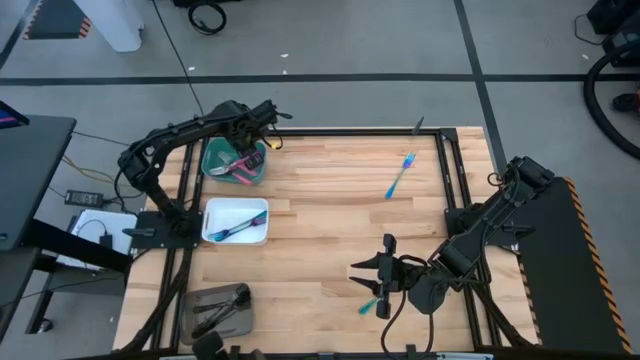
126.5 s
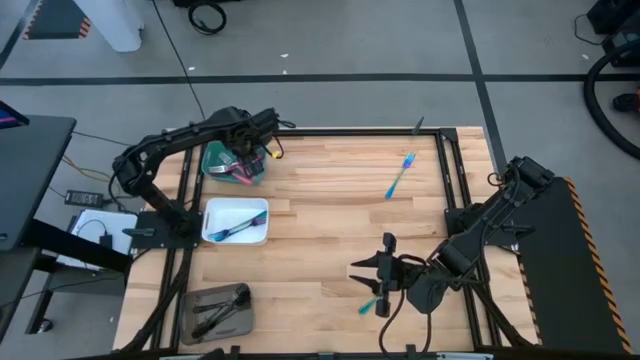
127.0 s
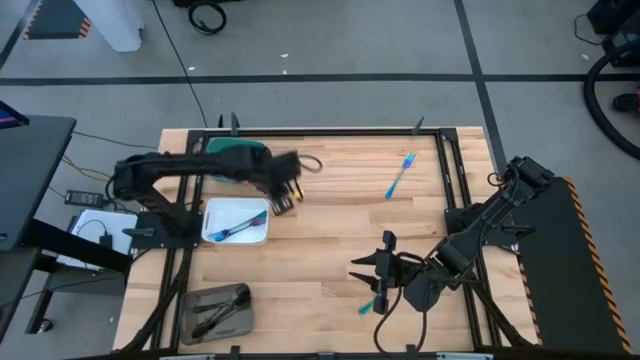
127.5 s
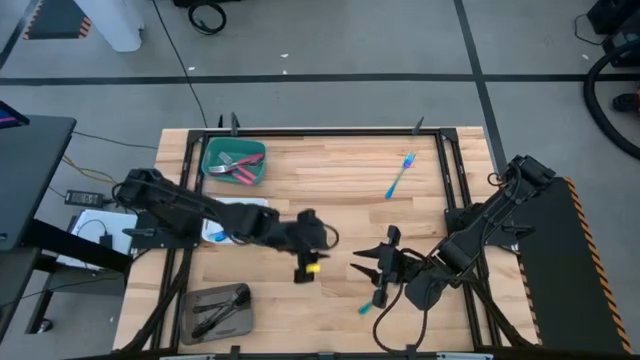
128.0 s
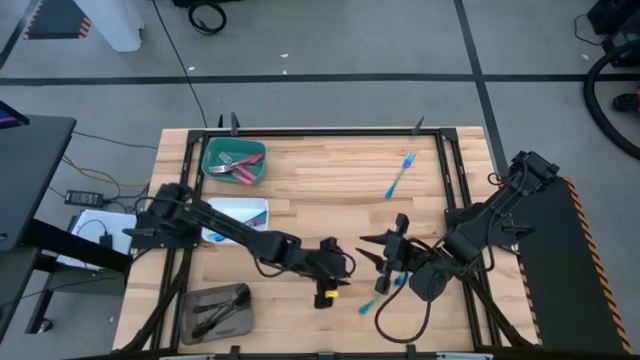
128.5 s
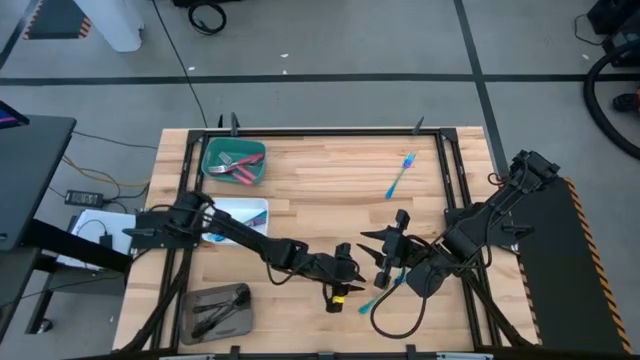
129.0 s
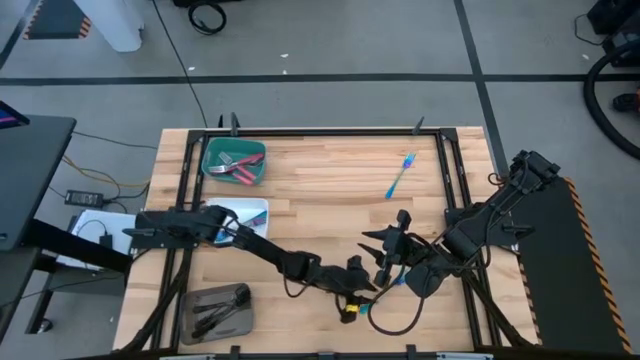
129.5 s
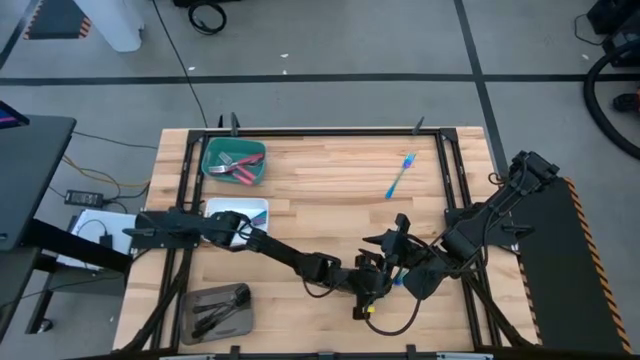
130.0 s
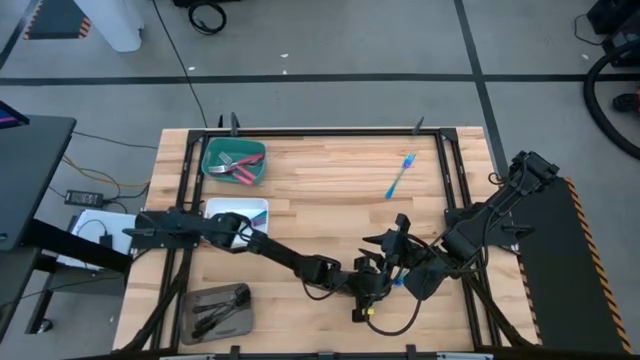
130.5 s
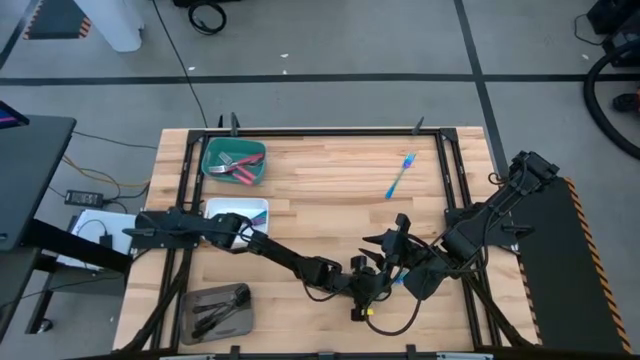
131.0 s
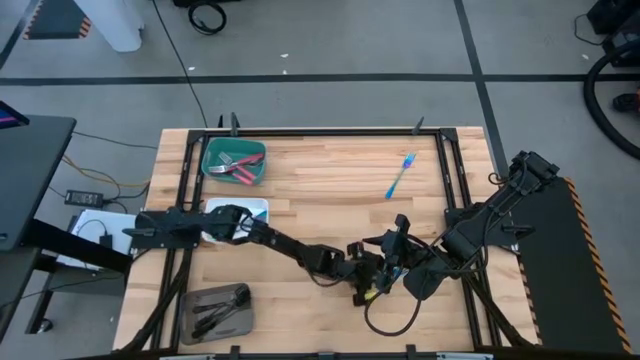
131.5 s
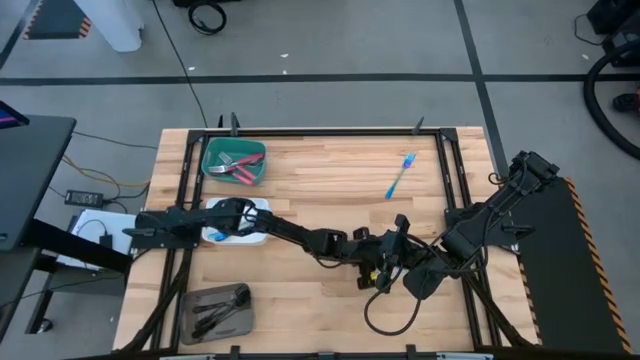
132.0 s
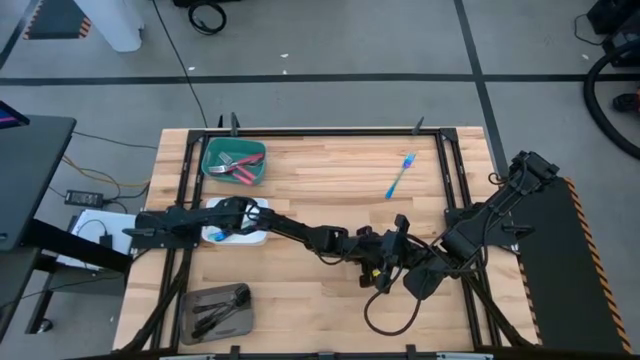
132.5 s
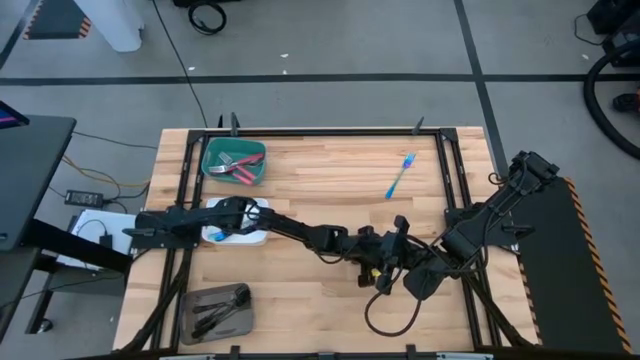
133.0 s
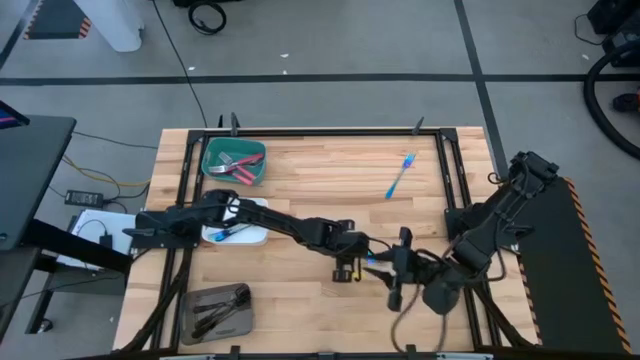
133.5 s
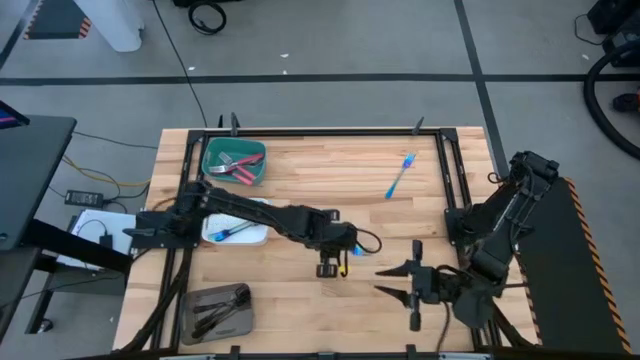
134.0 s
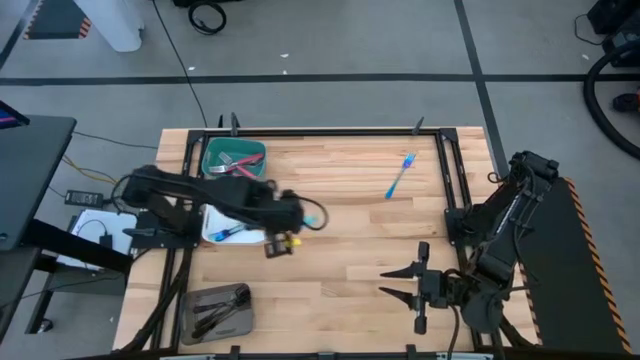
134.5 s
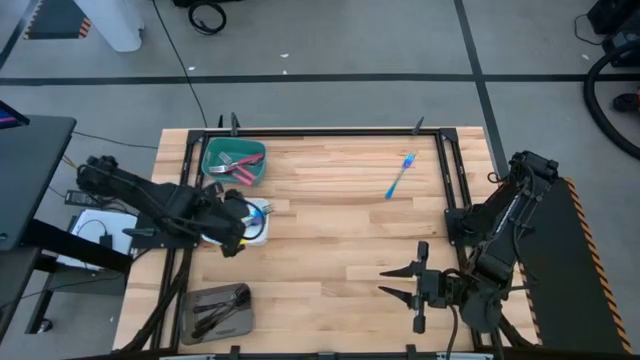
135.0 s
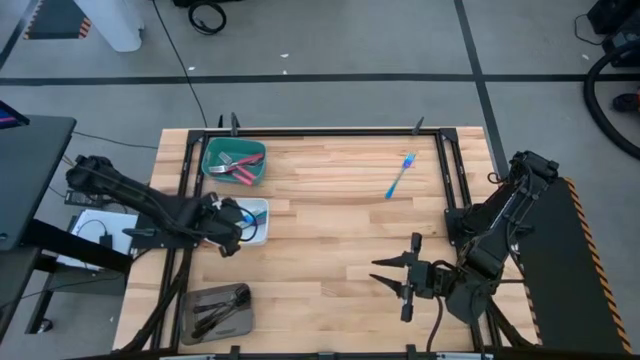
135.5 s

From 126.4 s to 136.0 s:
Task: Sort silverware by color (type)
Put the blue fork into the white bin

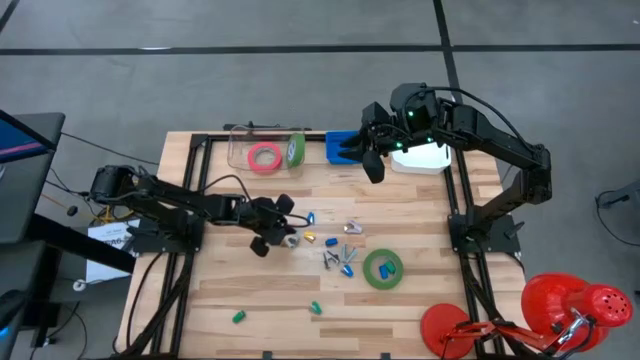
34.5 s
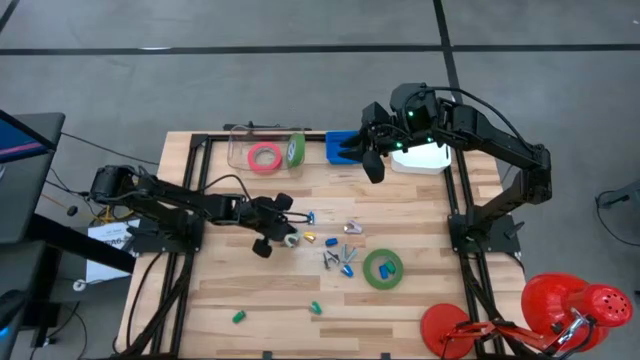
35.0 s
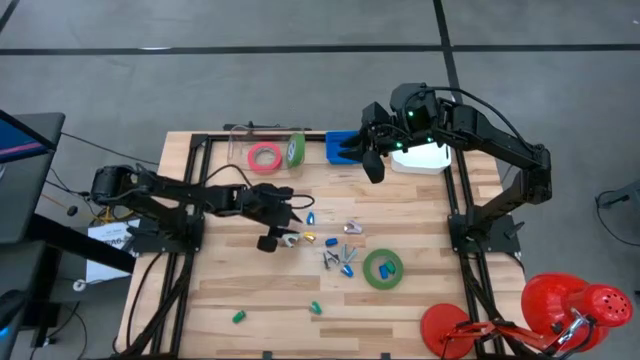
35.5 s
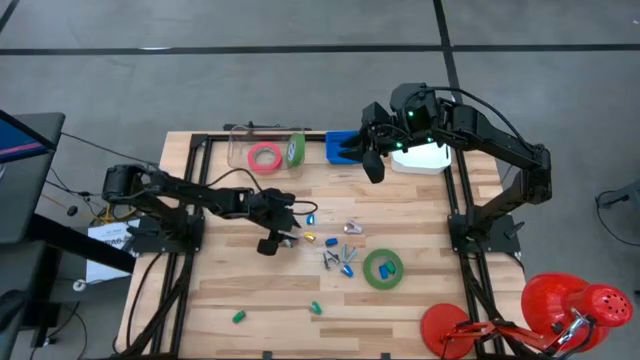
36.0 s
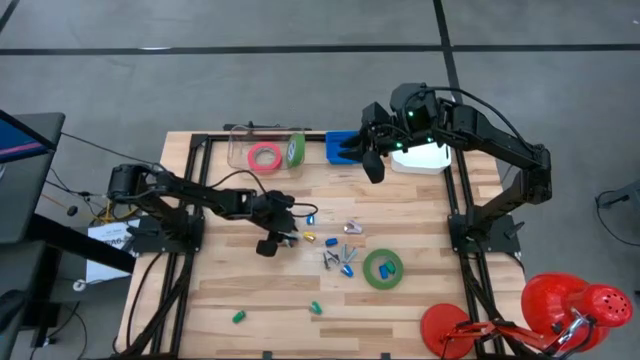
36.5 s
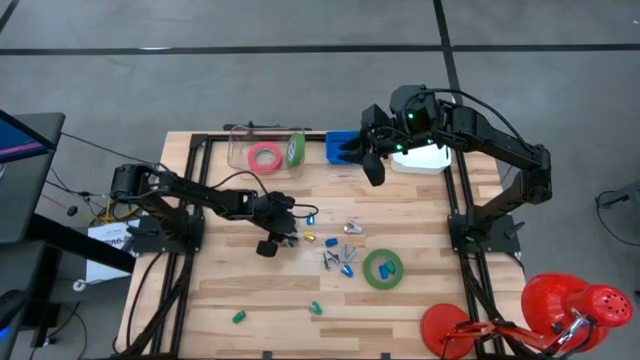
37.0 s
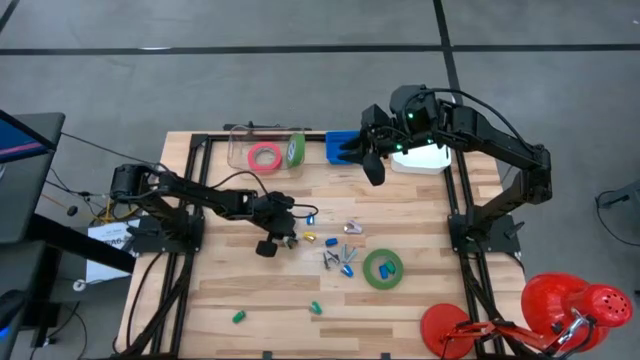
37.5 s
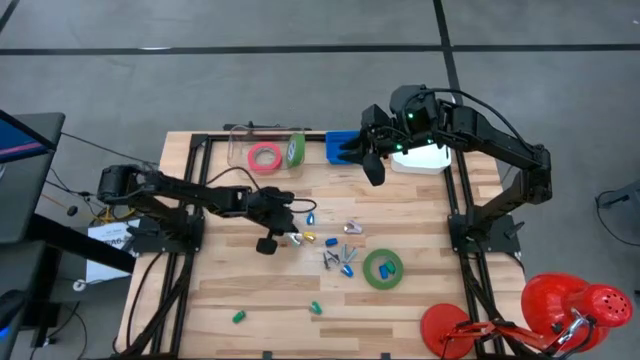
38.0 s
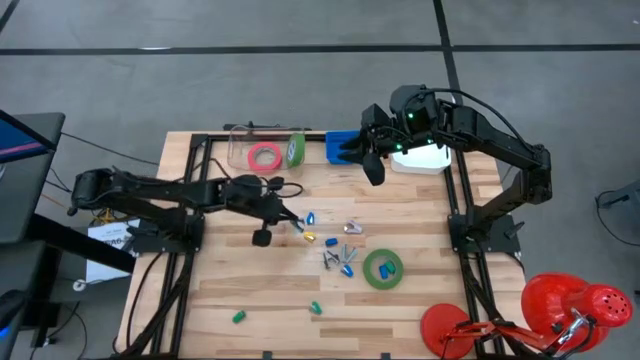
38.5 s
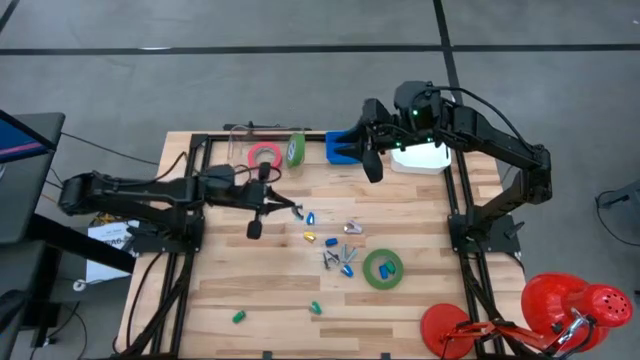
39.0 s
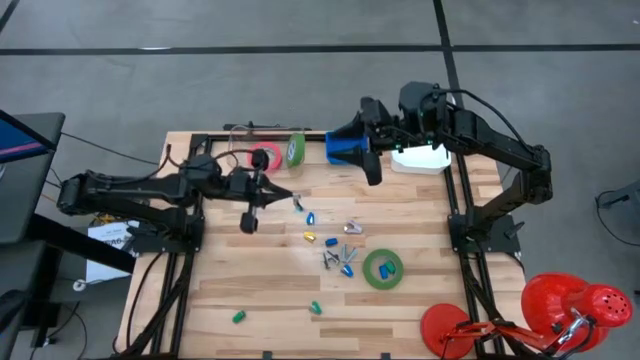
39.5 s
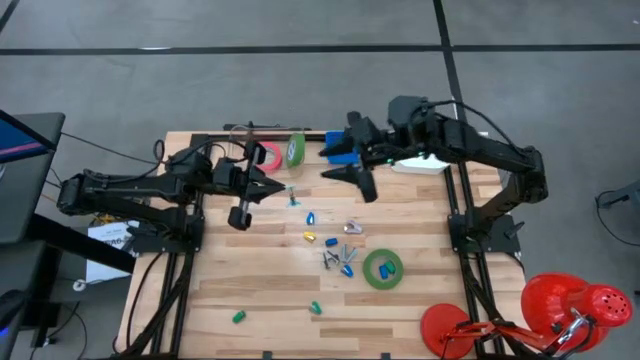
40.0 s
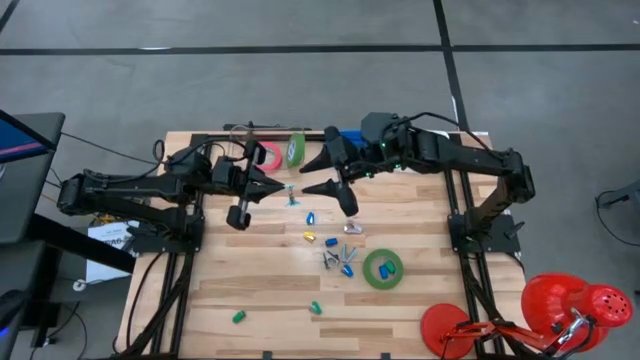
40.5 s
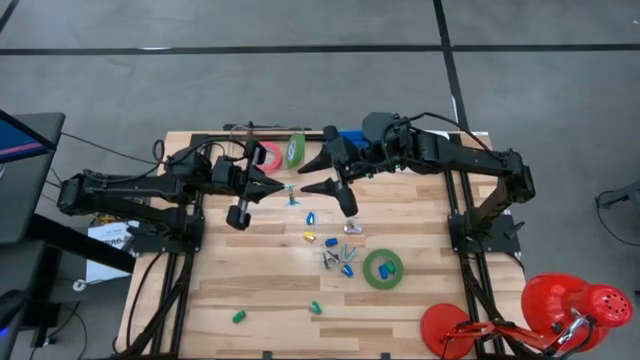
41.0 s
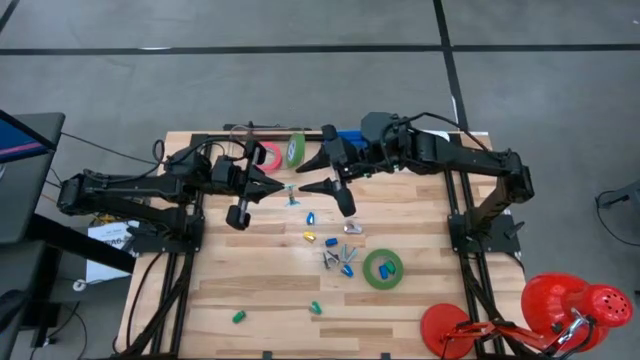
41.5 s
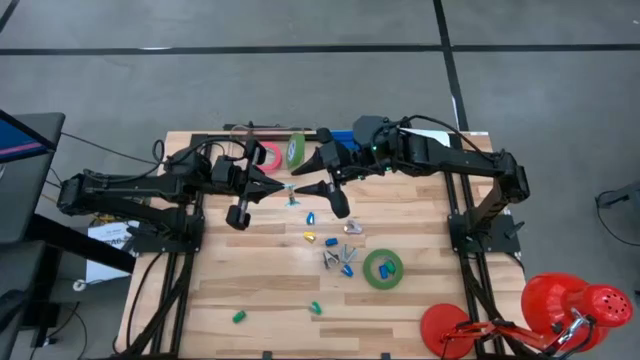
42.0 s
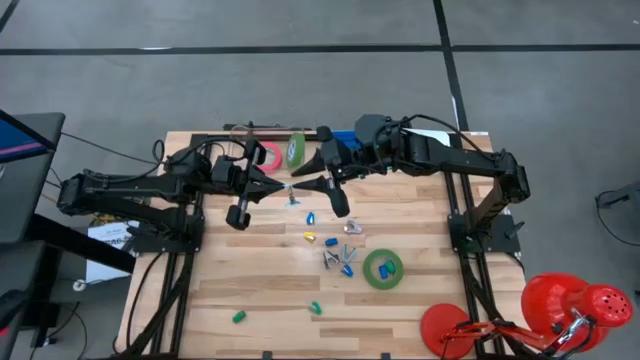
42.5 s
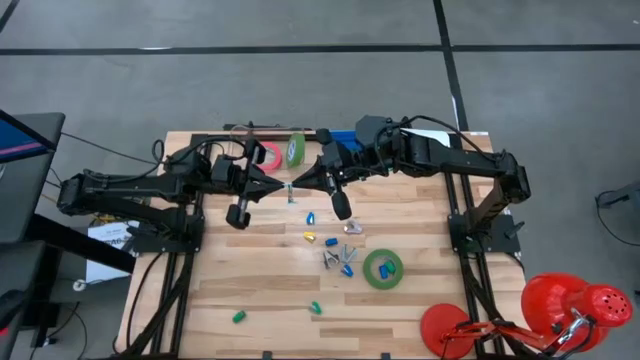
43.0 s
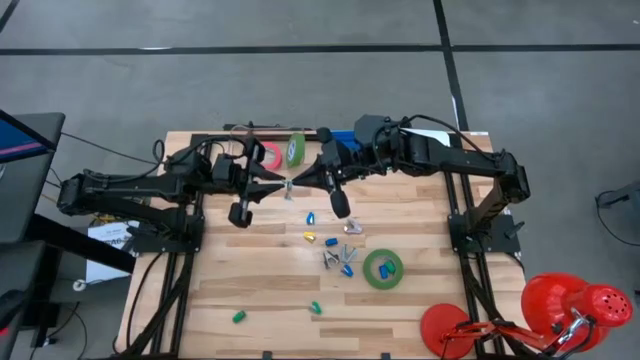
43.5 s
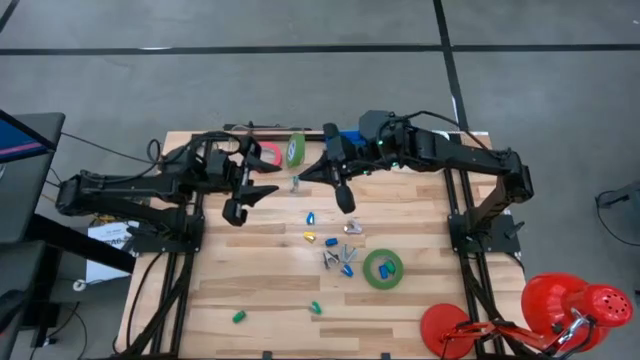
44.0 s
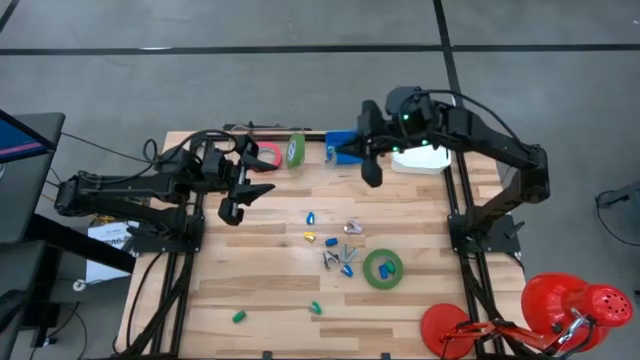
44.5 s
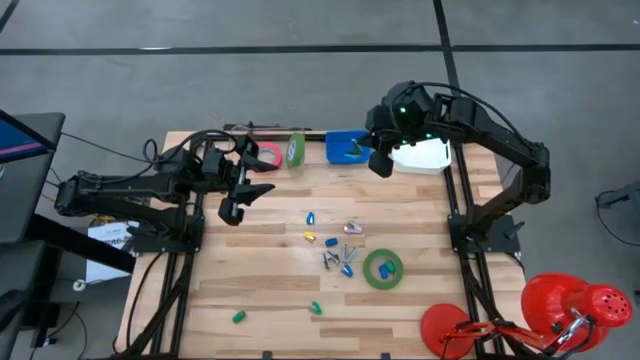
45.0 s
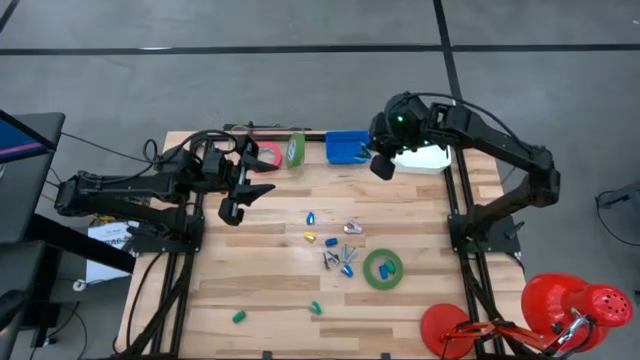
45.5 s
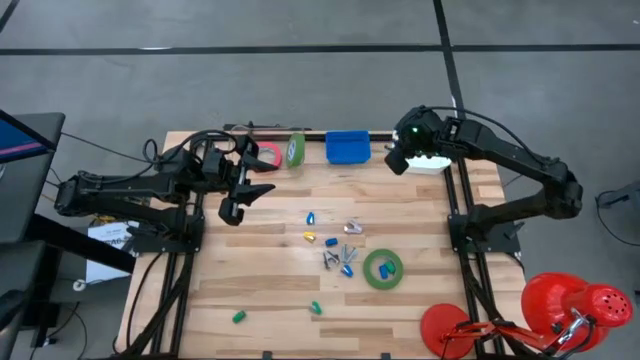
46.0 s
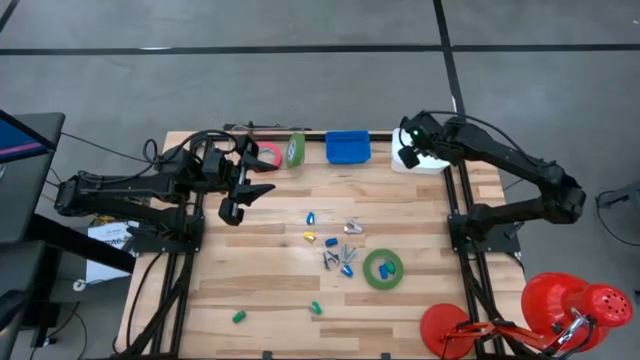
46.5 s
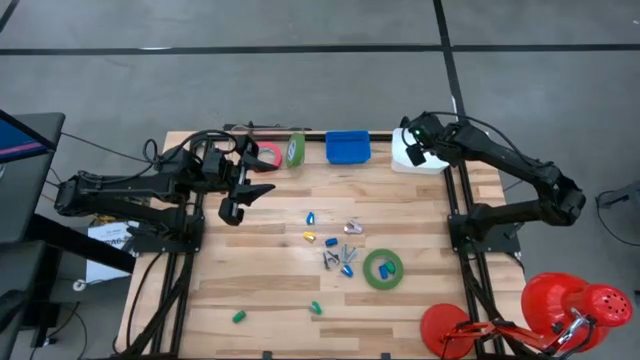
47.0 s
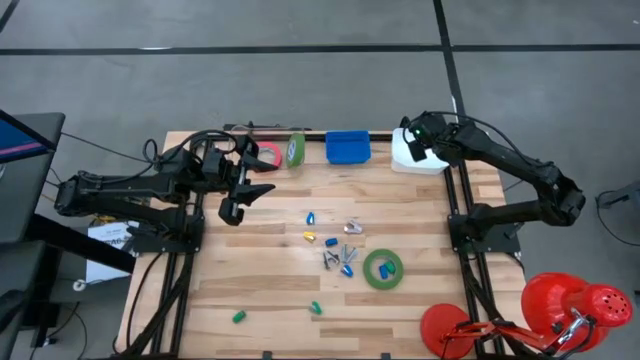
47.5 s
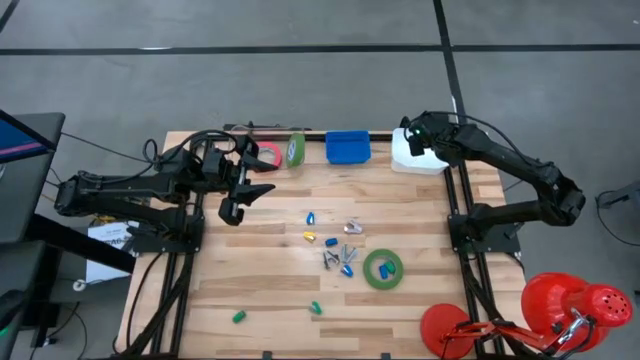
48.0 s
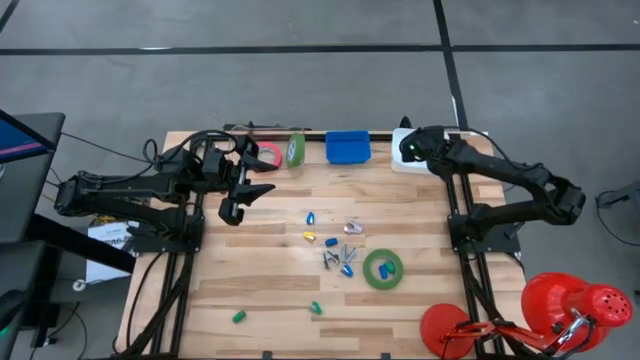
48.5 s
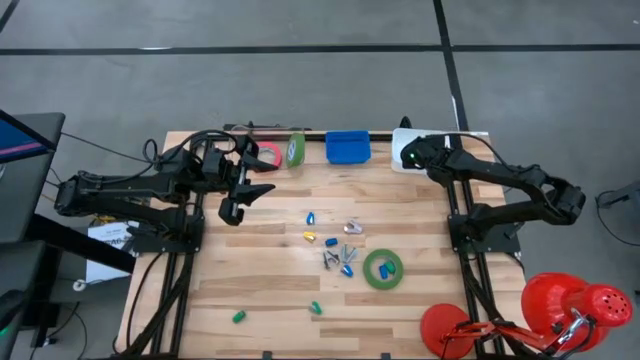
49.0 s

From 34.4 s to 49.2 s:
Task: Pick and place Stapler, Stapler remover, tape
Put the light blue staple remover into the white bin
